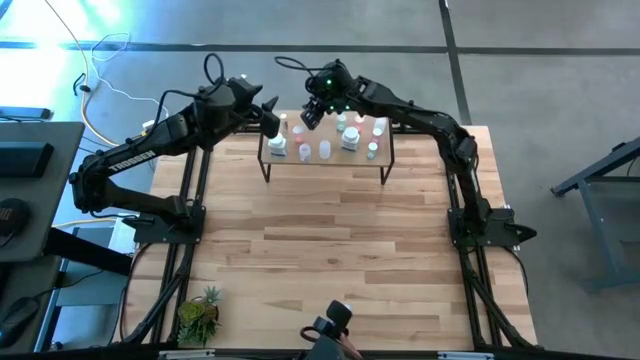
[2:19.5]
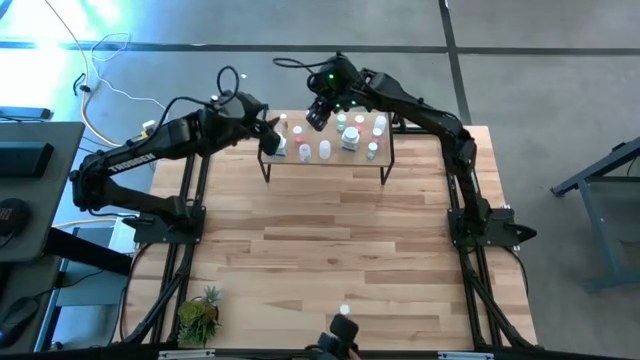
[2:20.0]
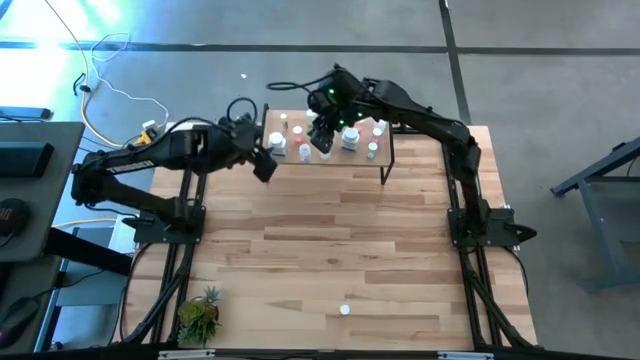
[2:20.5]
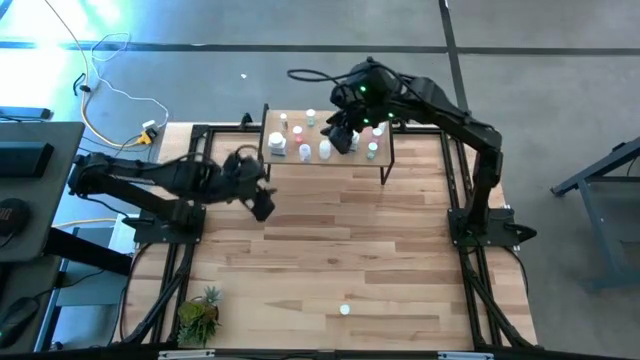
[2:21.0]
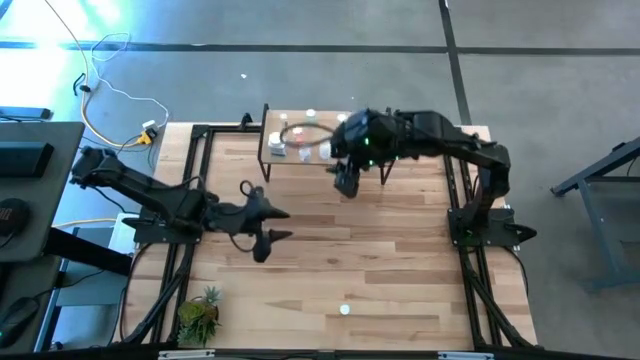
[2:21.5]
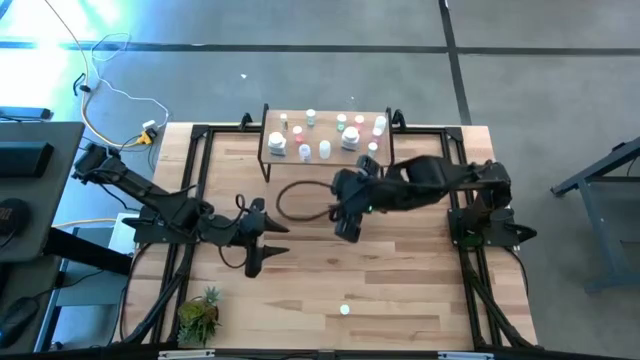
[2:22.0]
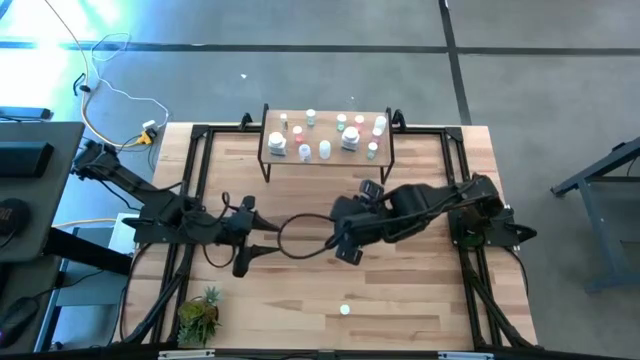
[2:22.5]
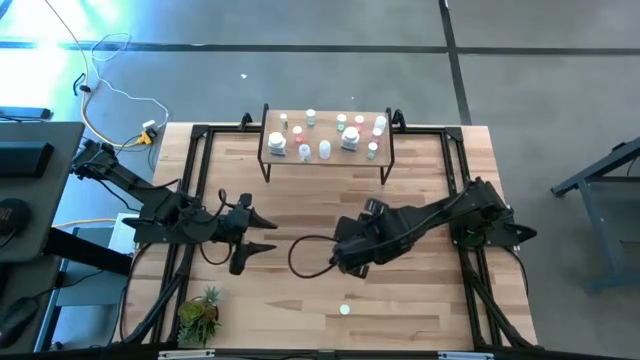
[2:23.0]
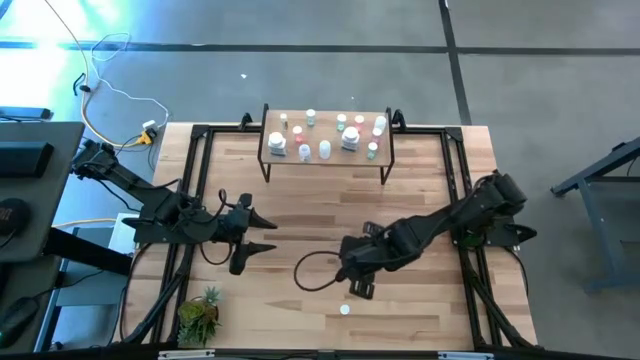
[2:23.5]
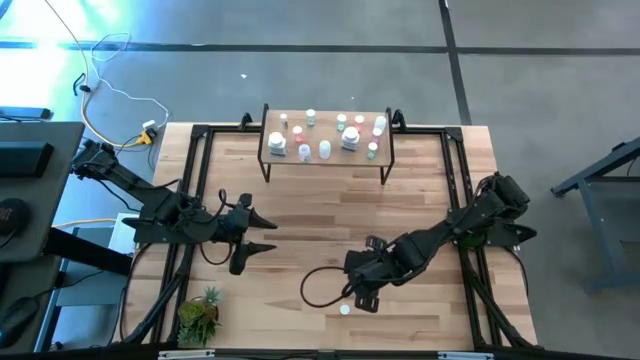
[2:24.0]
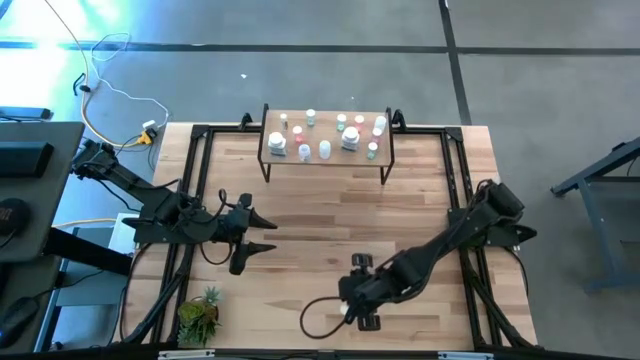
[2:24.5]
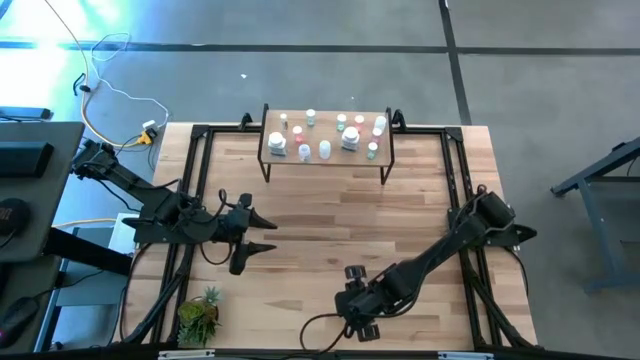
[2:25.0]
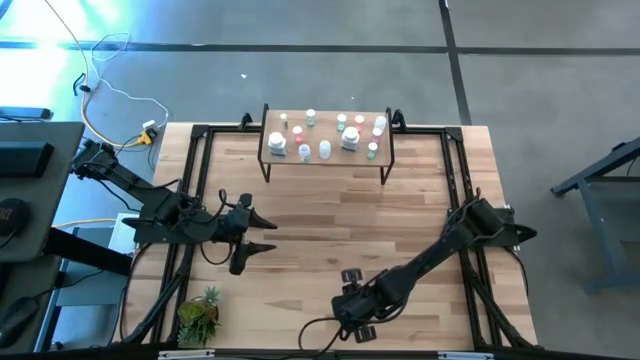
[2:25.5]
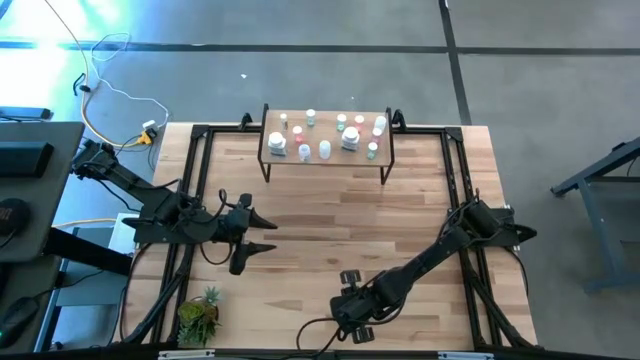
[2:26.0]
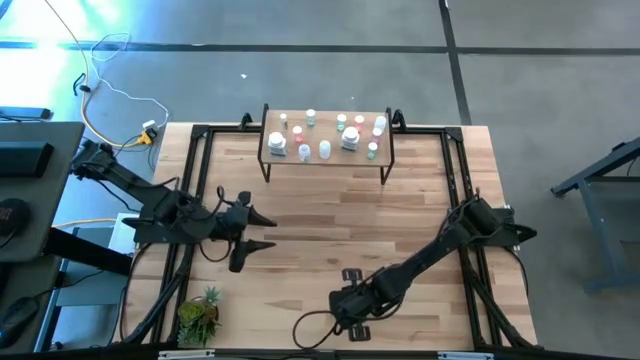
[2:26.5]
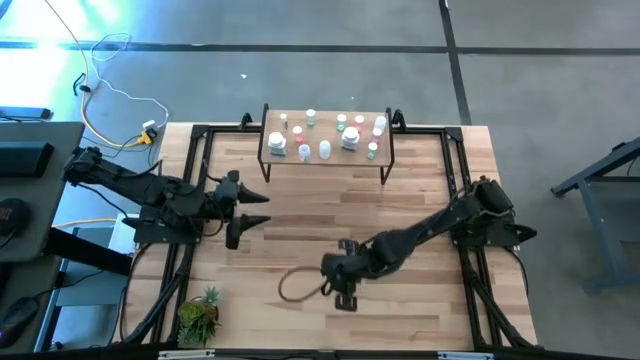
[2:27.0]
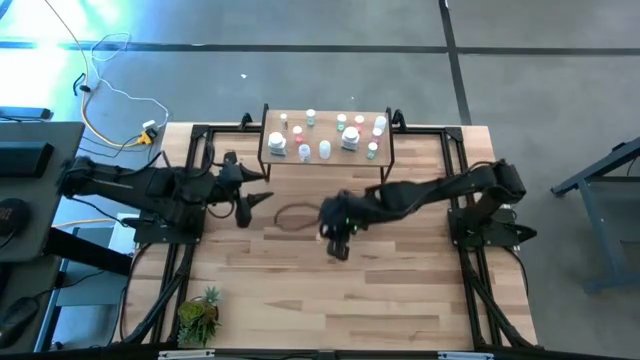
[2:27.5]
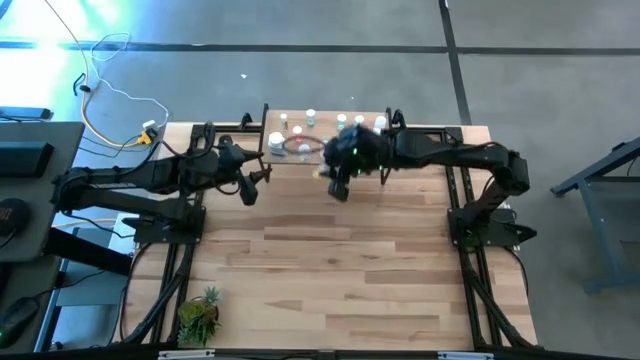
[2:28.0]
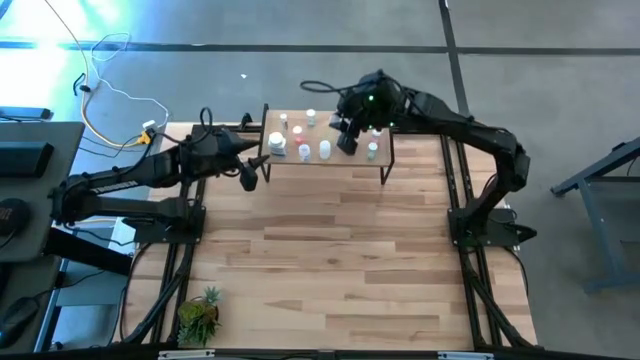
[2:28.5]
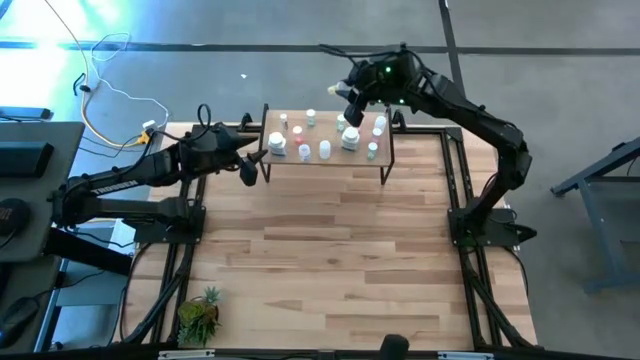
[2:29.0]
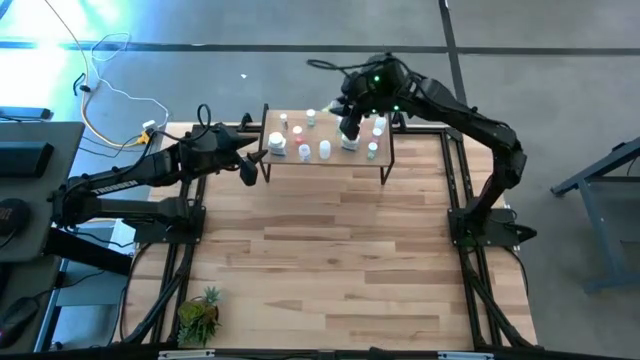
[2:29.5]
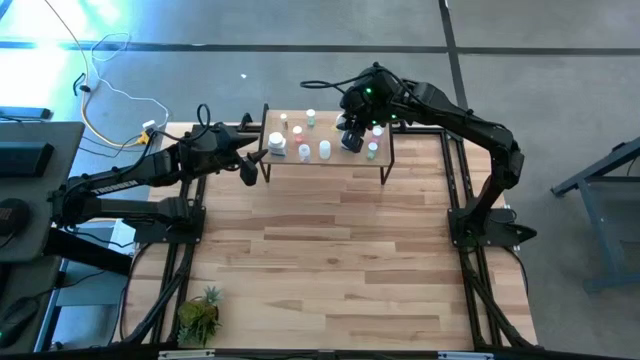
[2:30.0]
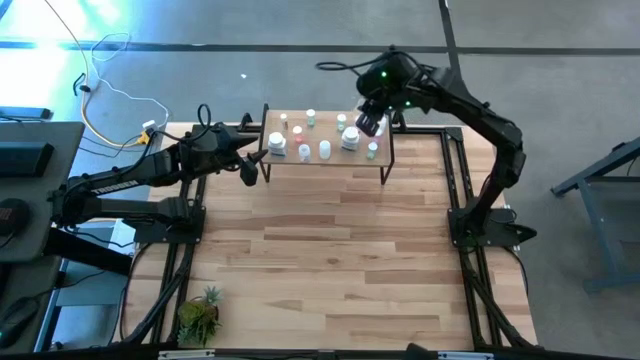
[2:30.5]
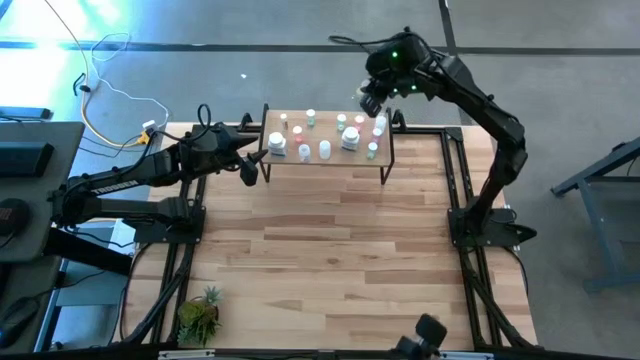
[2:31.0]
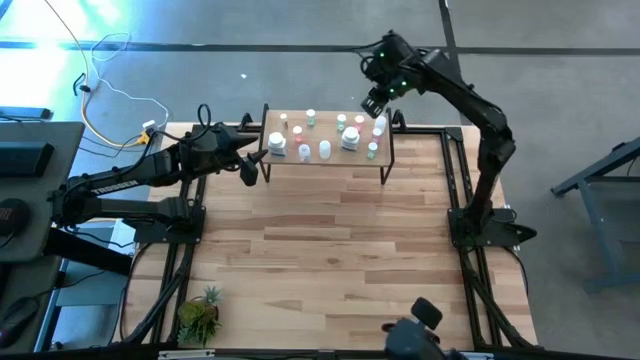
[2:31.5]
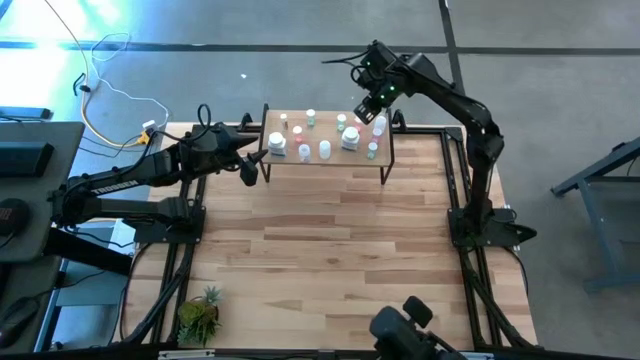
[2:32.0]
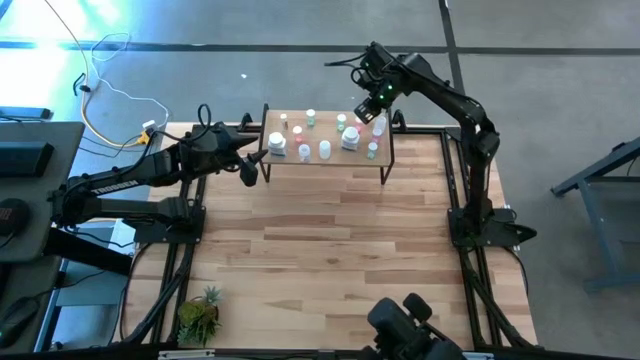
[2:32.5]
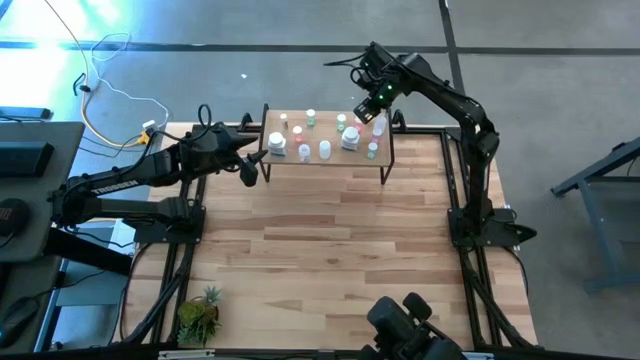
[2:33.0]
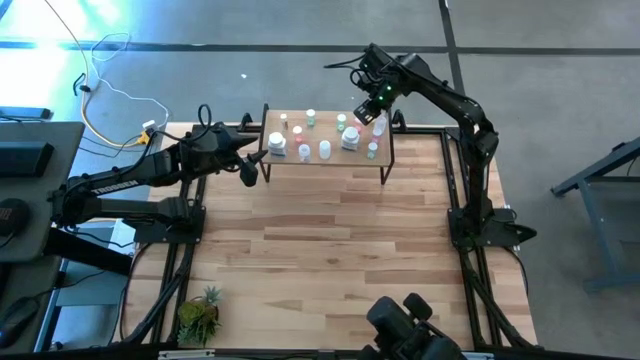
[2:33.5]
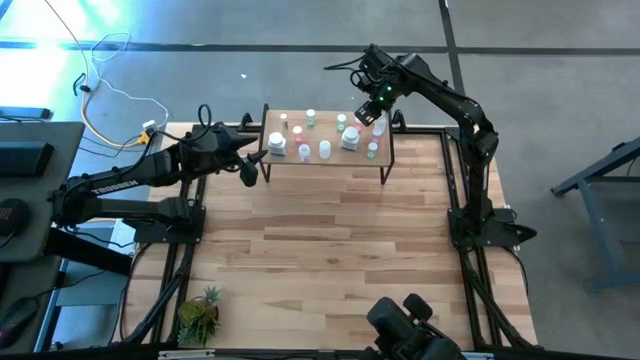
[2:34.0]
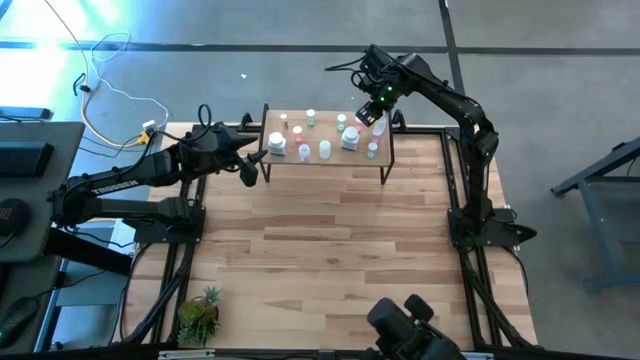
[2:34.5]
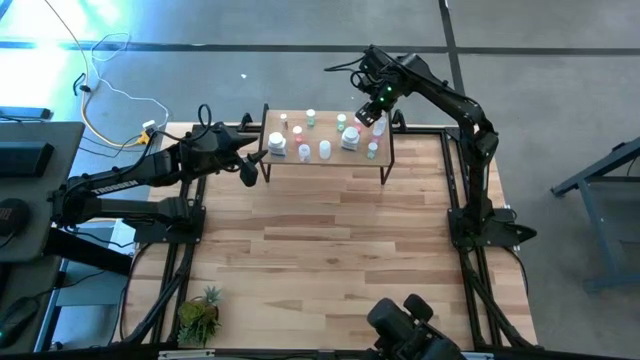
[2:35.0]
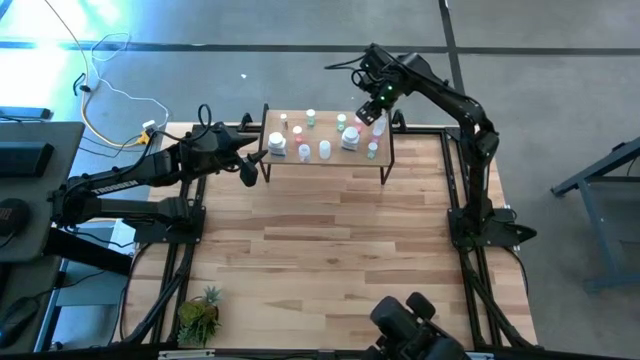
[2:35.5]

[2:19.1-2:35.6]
Task: Pick and place medicine bottles onto shelf by color
Put the yellow pill on the shelf

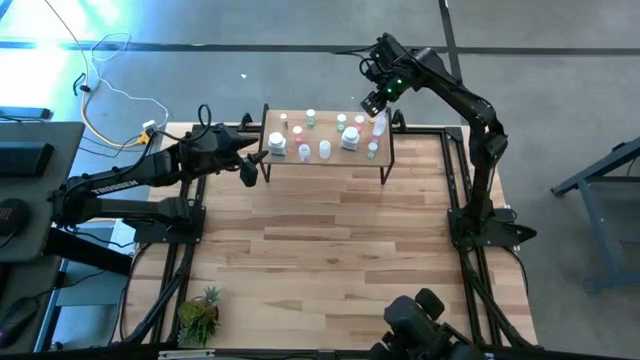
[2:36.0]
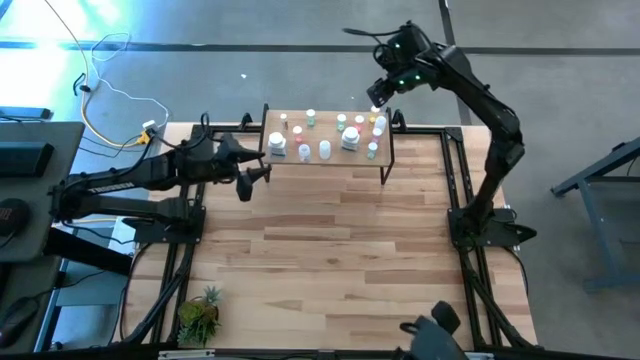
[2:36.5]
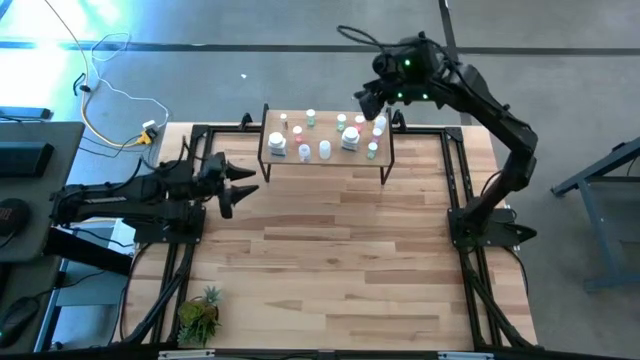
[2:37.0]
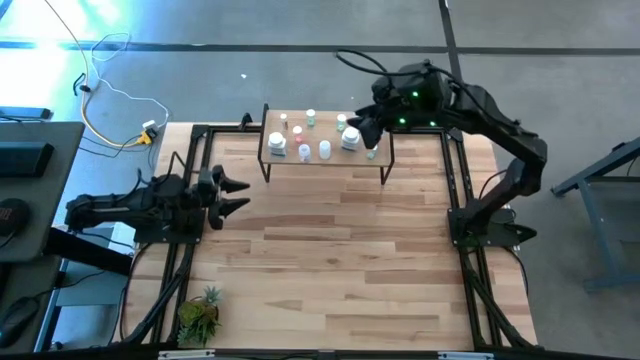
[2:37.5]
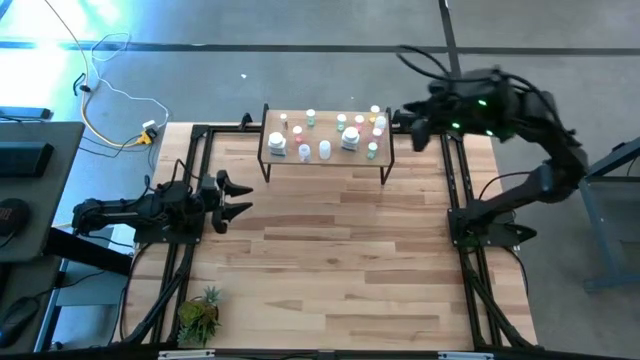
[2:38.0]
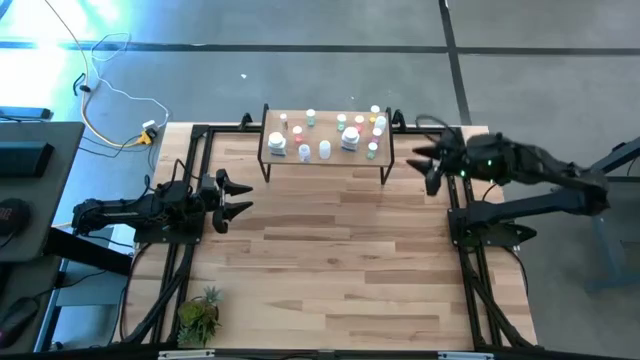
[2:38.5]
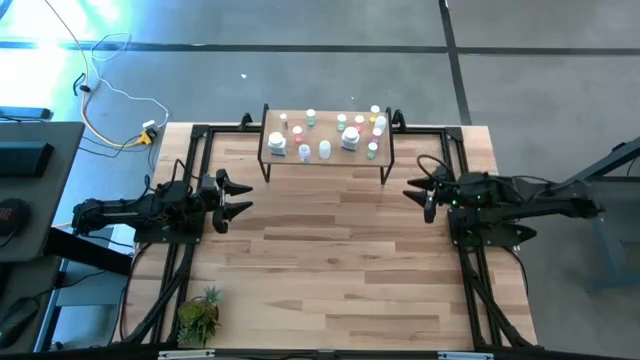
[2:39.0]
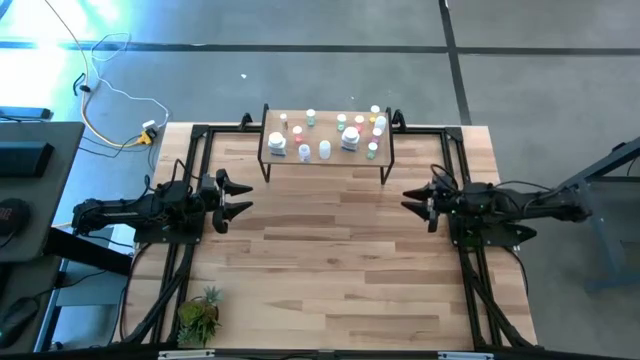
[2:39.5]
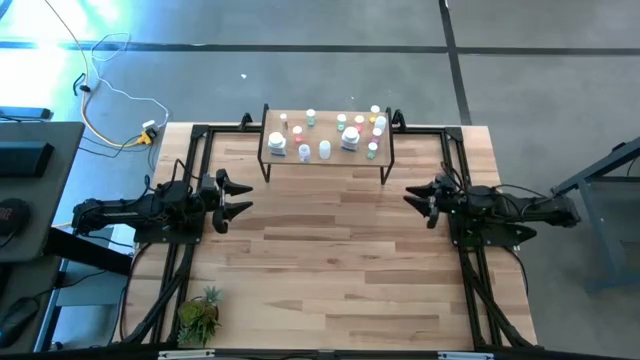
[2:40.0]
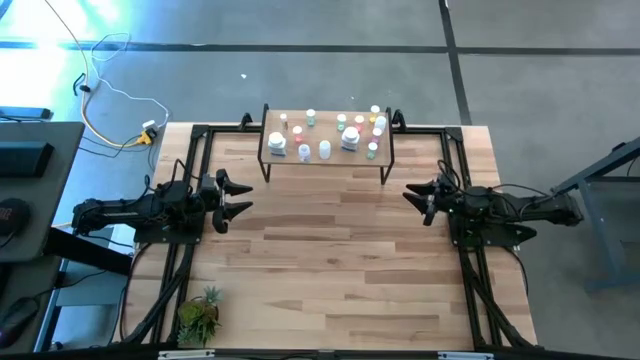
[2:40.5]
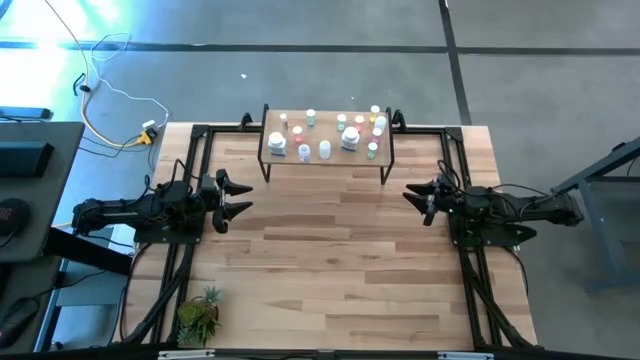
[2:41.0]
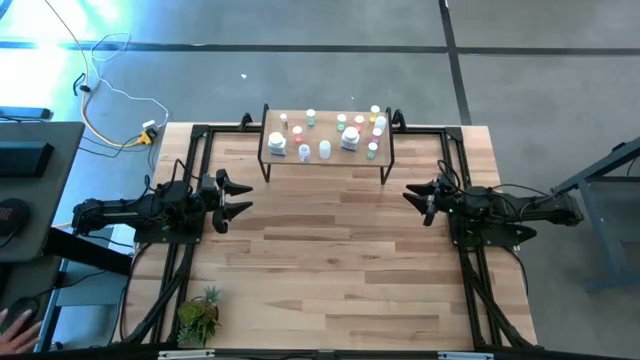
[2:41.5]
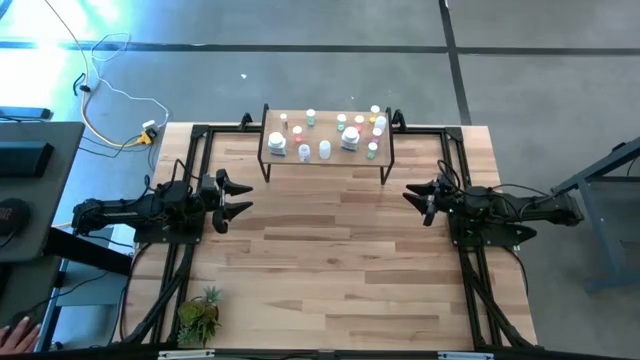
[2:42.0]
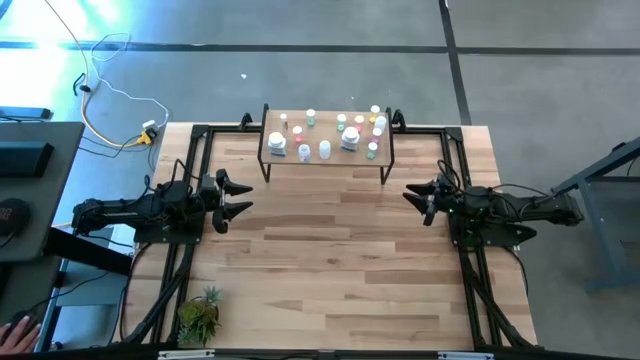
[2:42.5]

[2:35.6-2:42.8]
Return to Home Position
